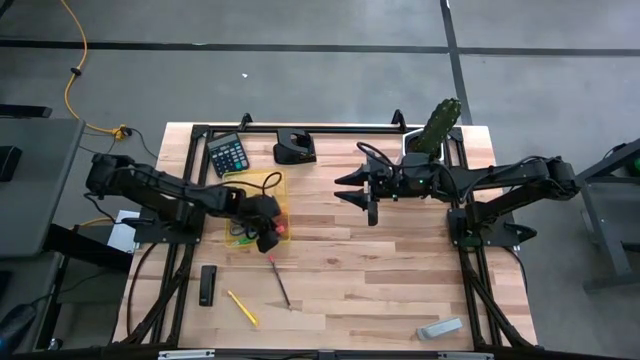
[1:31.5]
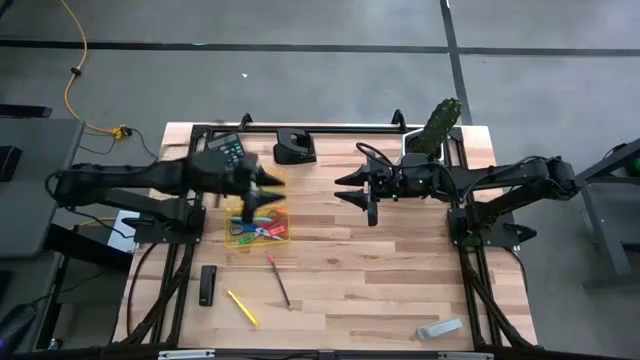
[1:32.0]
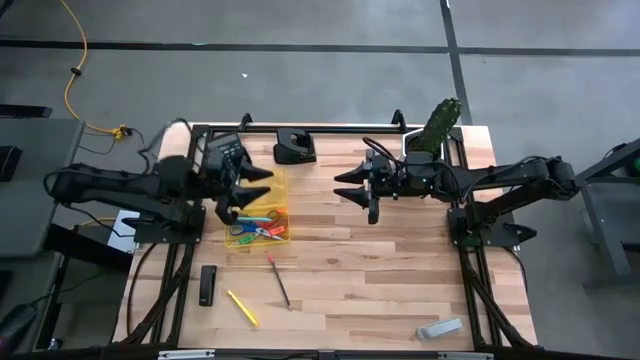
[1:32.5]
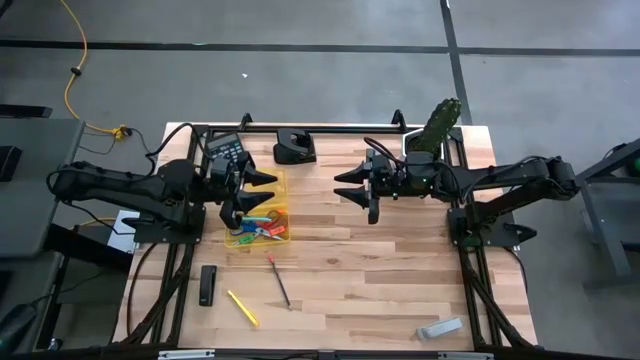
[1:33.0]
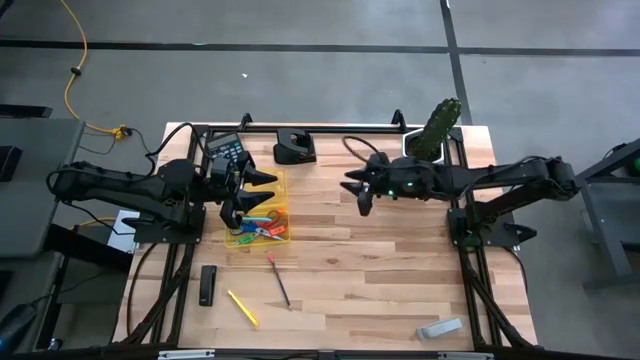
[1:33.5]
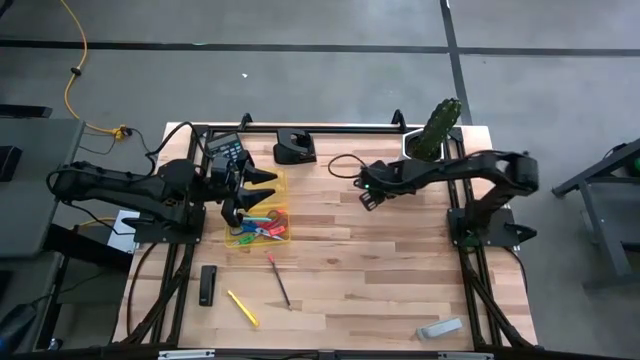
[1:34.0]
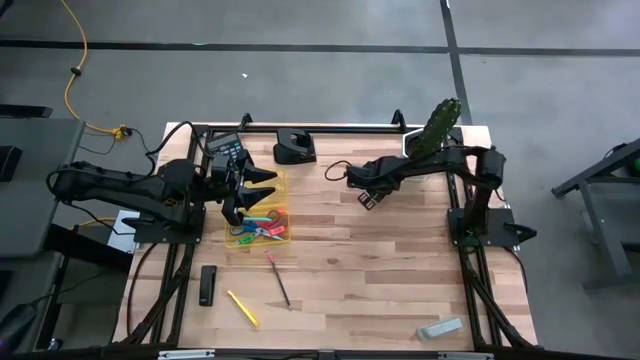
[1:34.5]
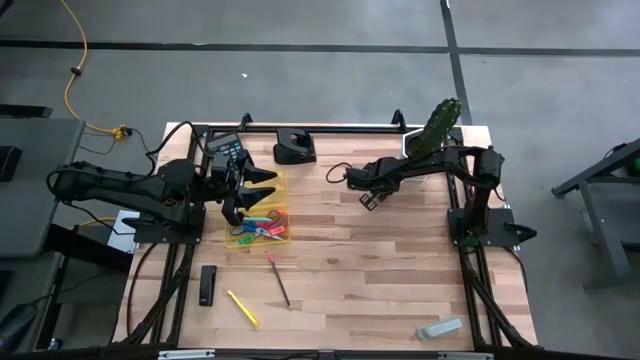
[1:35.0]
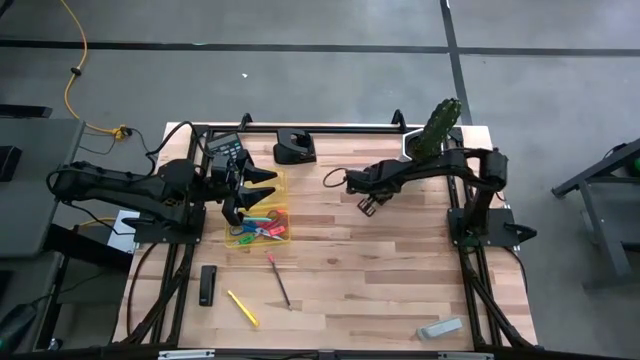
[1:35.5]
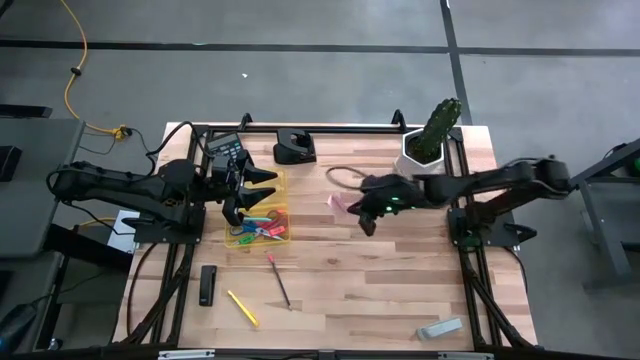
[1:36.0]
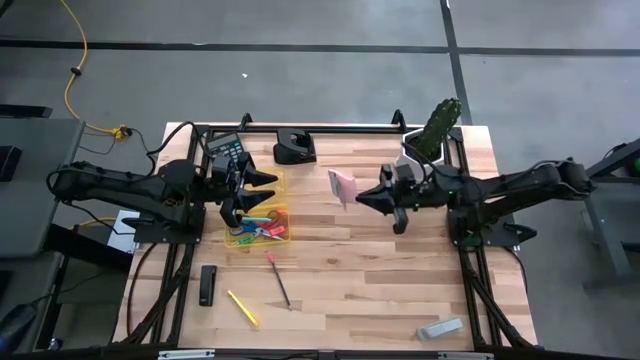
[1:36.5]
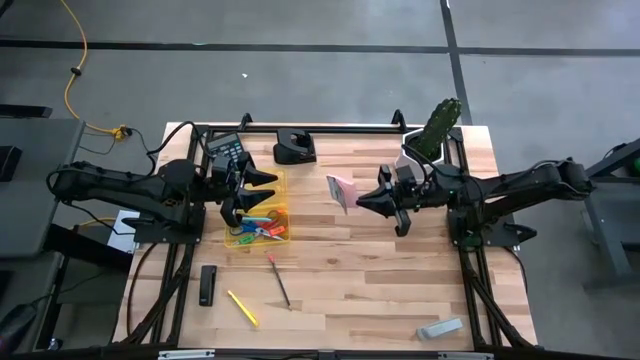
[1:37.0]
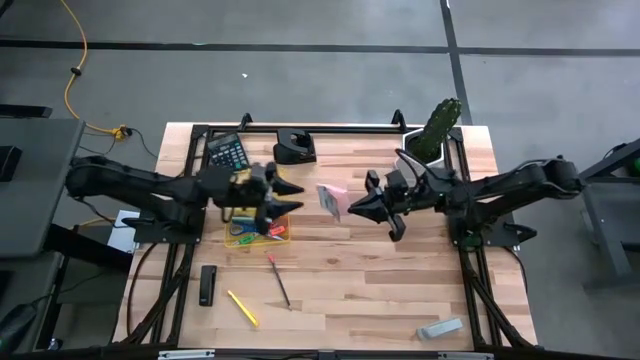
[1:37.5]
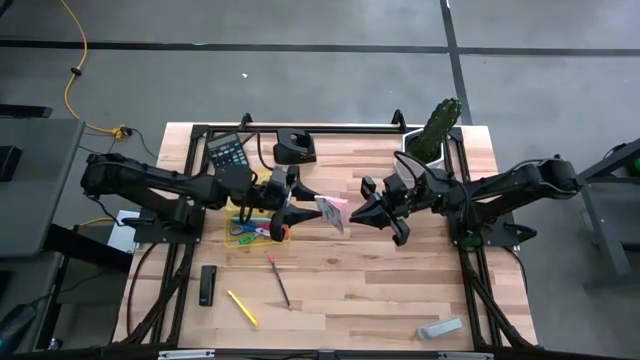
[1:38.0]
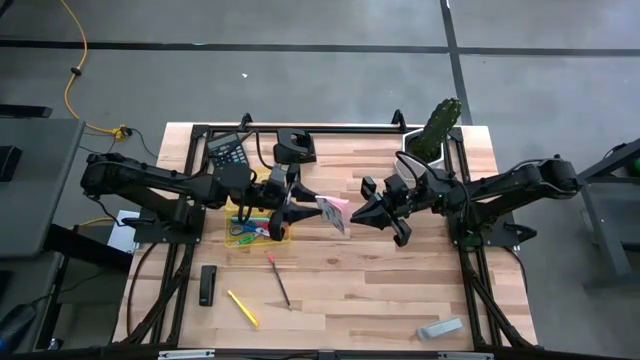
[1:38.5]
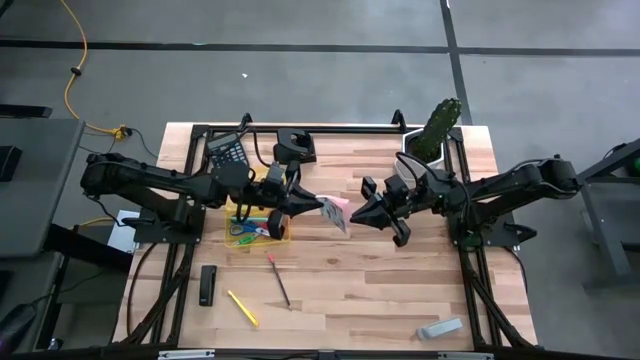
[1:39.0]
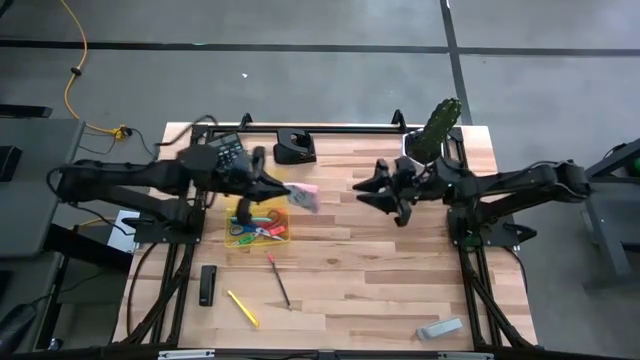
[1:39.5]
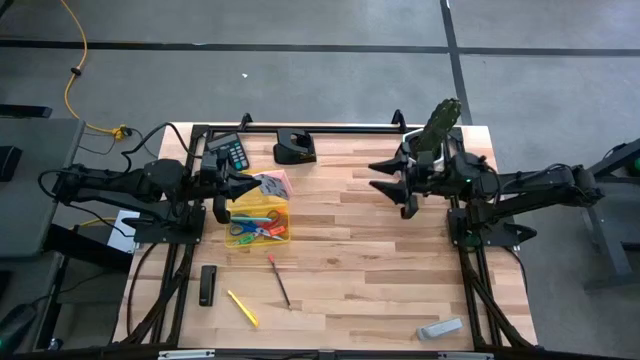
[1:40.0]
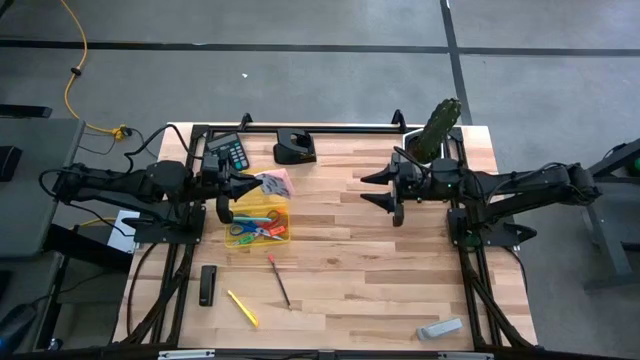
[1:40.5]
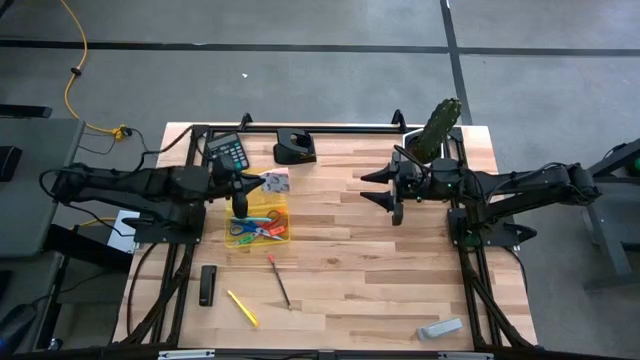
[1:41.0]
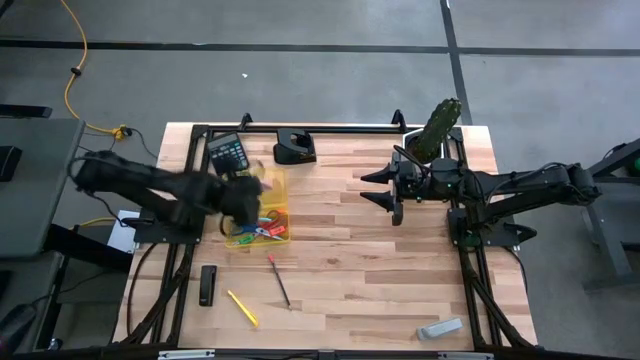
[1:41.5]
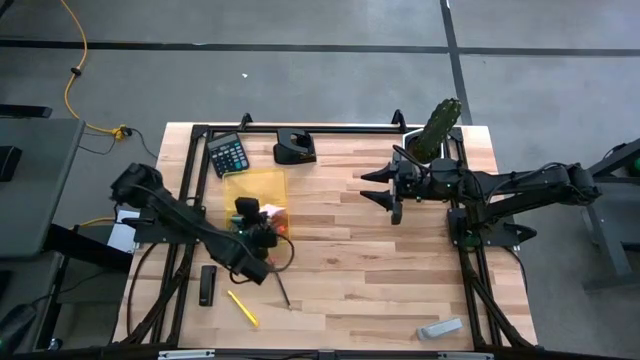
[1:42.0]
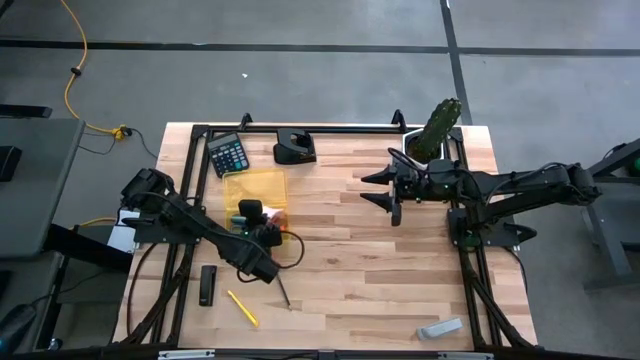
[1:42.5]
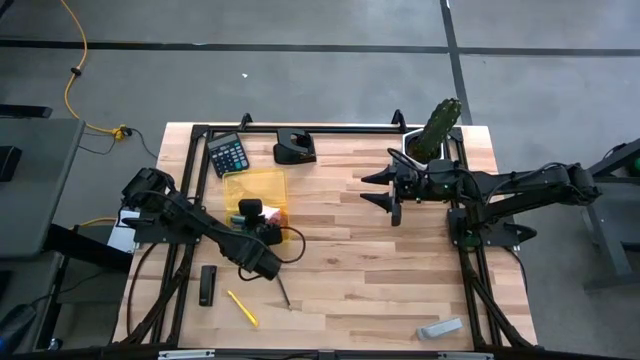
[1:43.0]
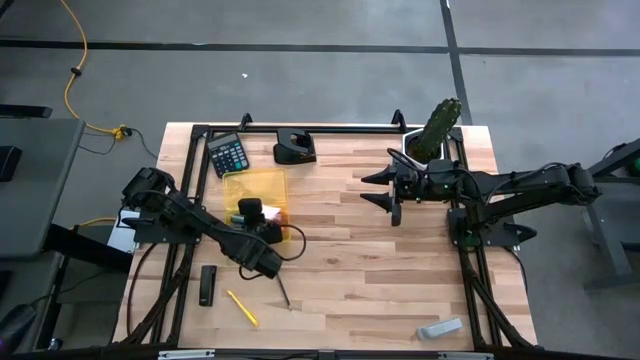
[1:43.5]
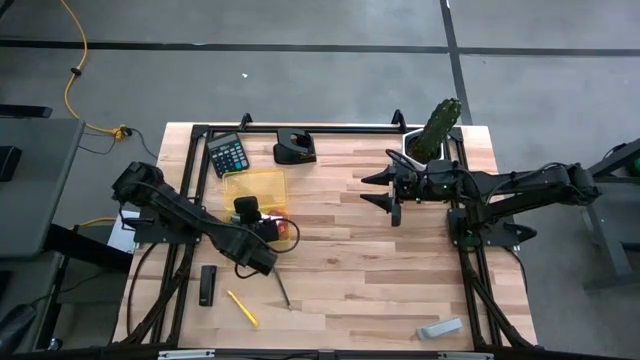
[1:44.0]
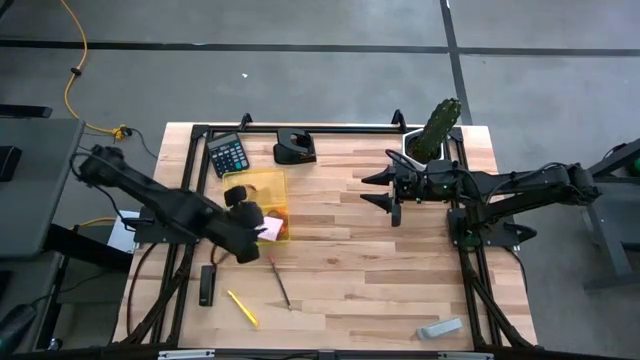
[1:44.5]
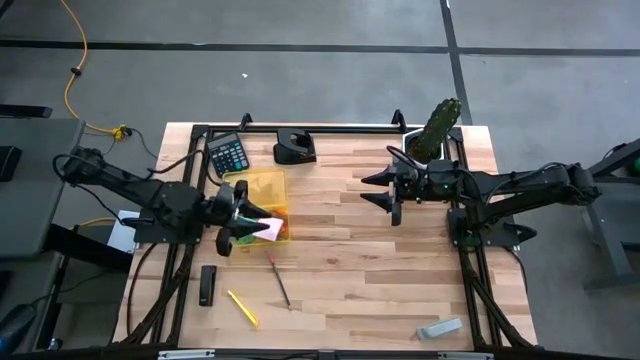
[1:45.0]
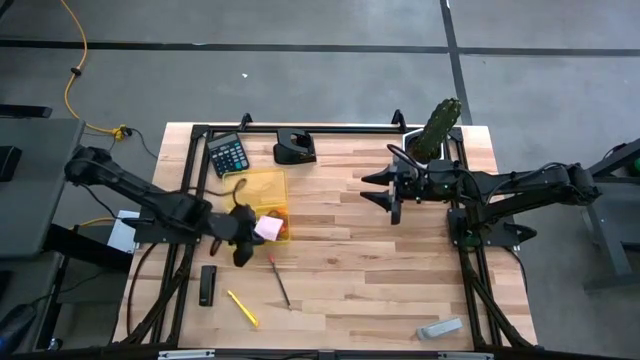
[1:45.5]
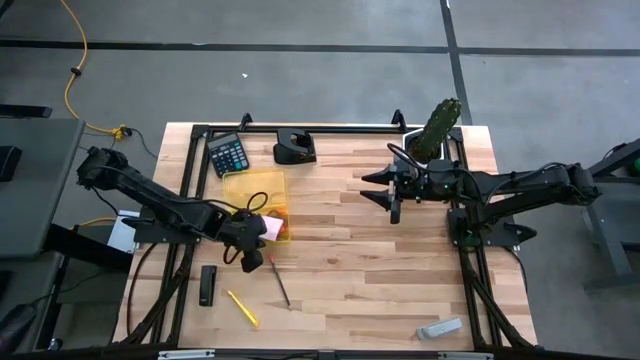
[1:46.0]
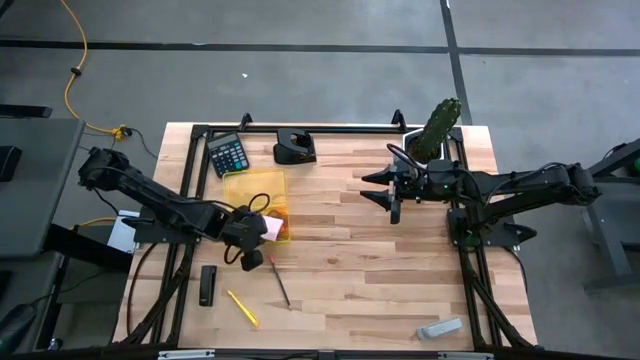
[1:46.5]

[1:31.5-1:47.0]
Task: Pack school essentials
Put the pink sticky notes into the yellow supply box

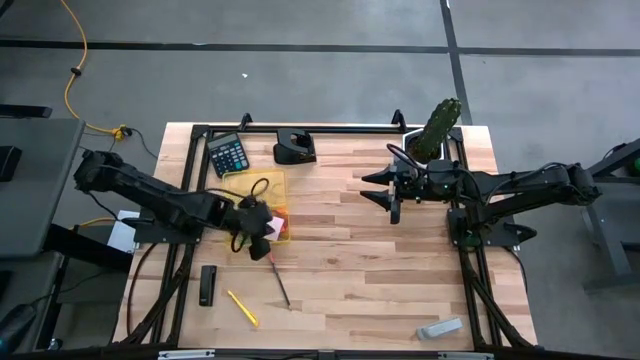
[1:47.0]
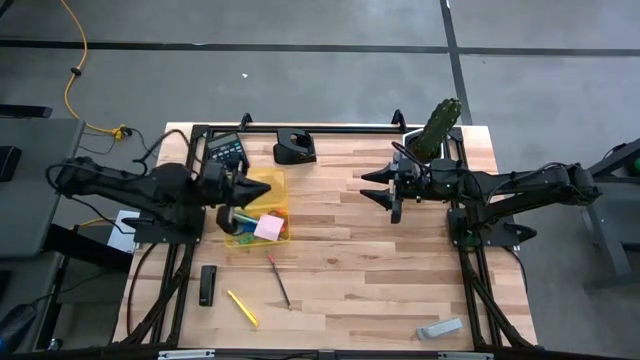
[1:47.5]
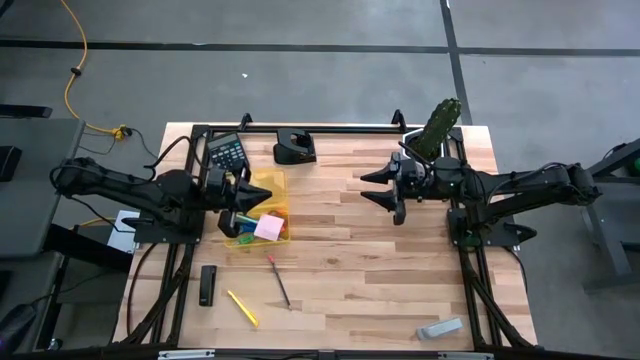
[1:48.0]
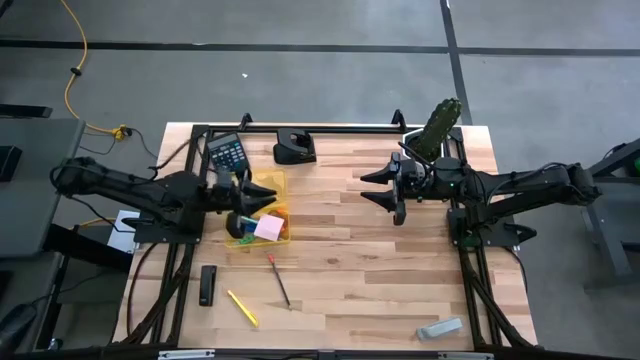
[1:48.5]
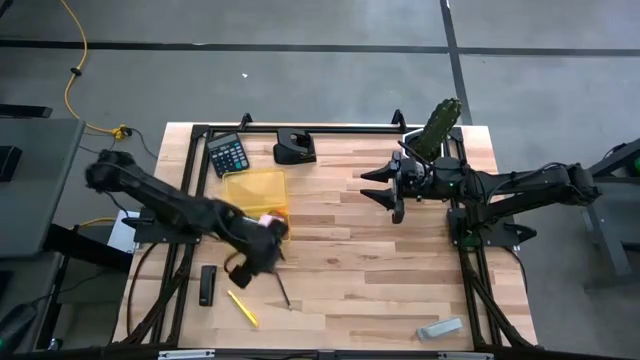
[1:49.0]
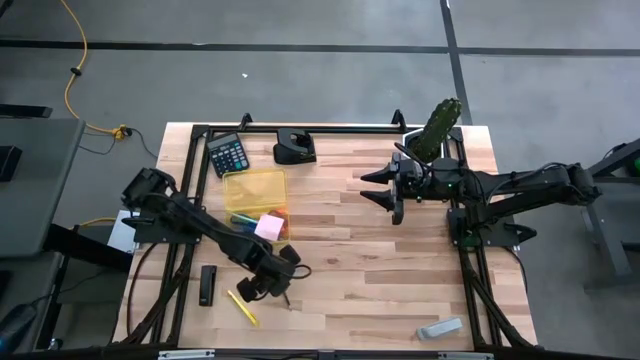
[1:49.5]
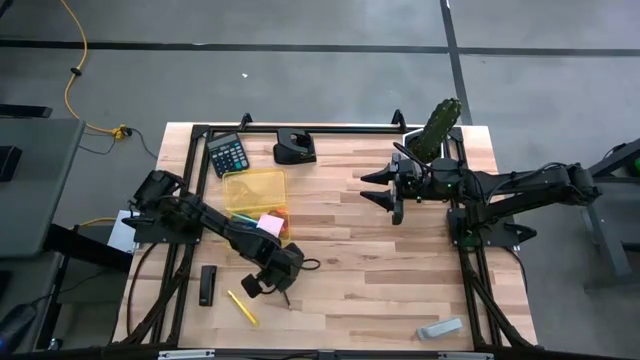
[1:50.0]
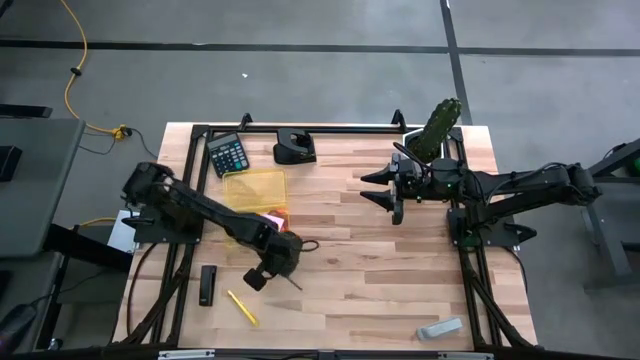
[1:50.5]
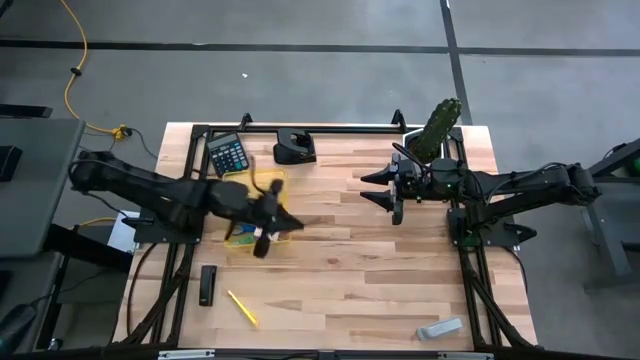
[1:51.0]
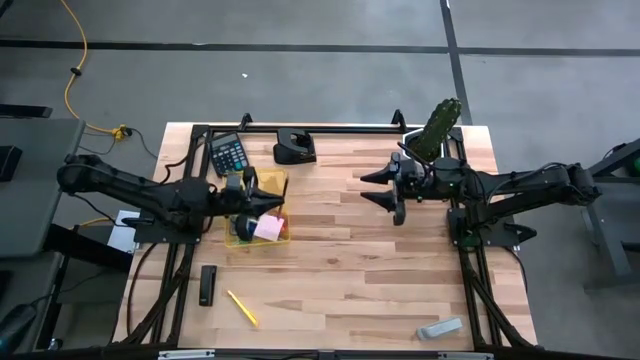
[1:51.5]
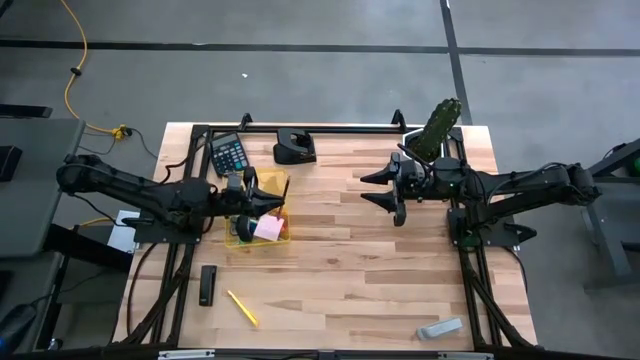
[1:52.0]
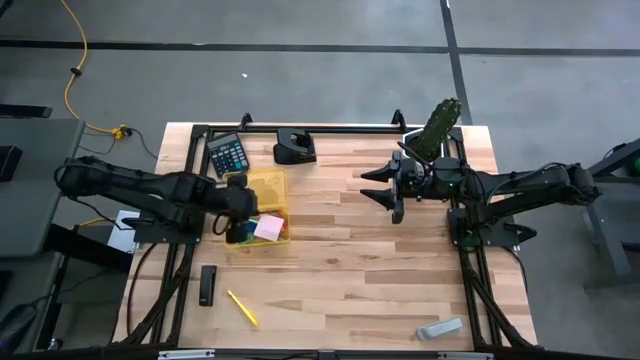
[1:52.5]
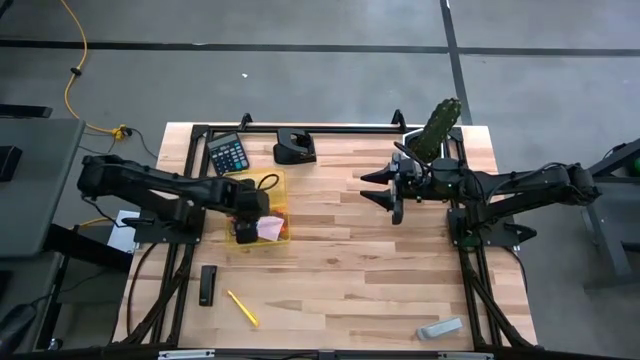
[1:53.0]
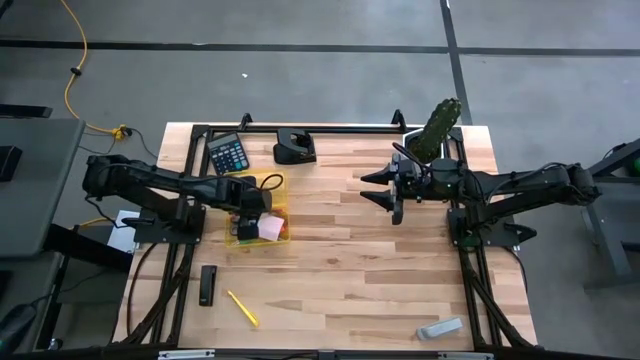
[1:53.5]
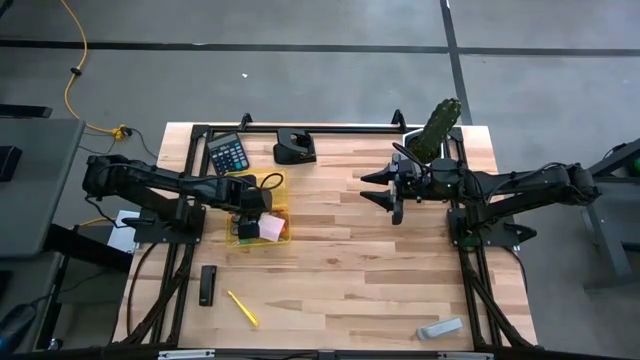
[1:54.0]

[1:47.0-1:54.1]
Put the blue pencil into the yellow supply box
